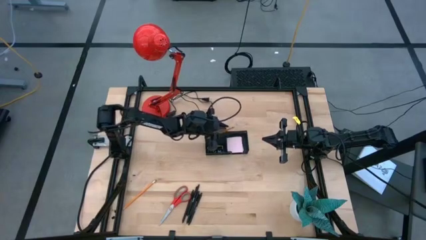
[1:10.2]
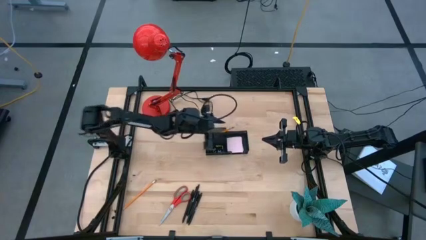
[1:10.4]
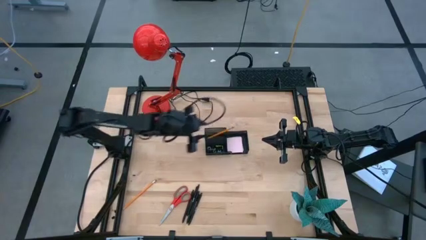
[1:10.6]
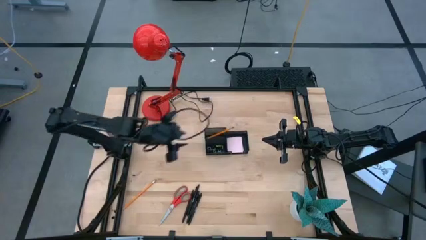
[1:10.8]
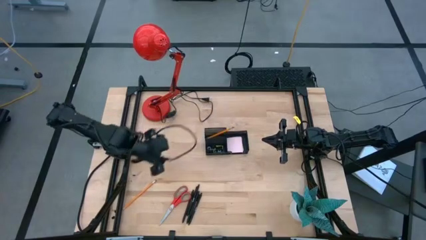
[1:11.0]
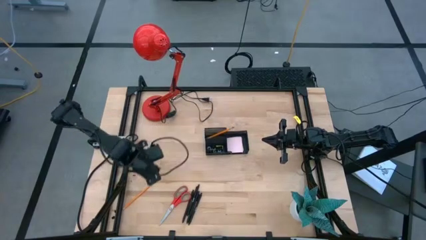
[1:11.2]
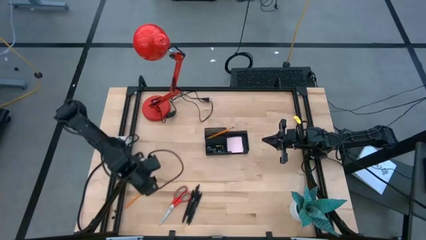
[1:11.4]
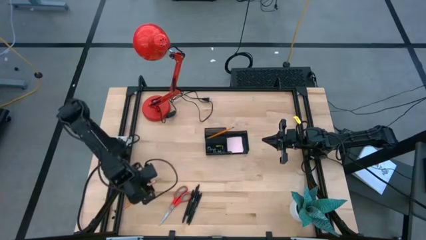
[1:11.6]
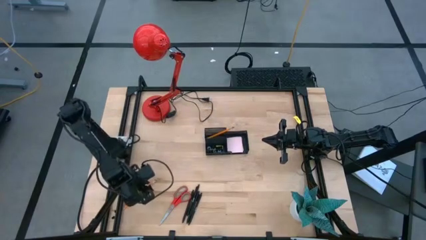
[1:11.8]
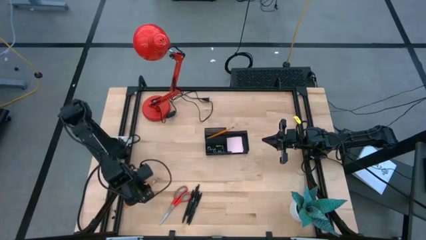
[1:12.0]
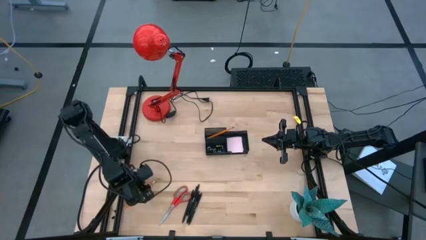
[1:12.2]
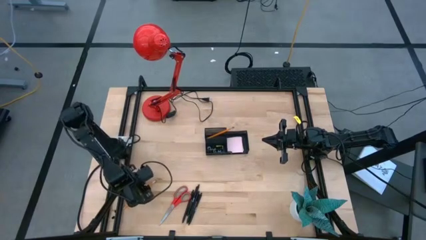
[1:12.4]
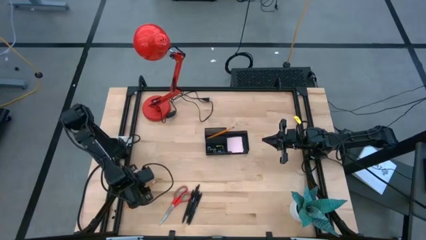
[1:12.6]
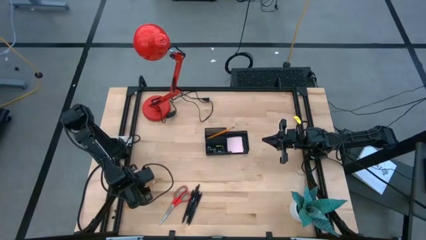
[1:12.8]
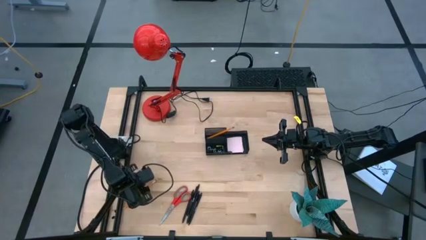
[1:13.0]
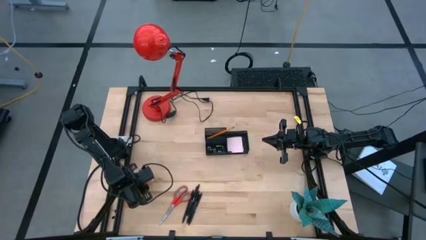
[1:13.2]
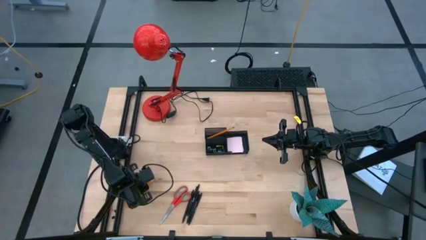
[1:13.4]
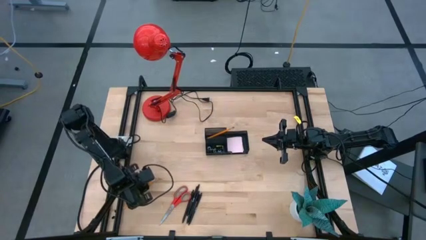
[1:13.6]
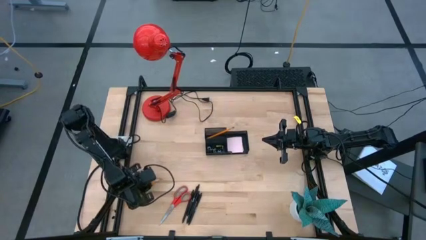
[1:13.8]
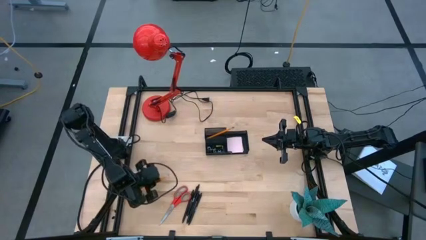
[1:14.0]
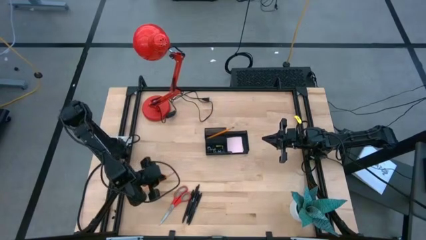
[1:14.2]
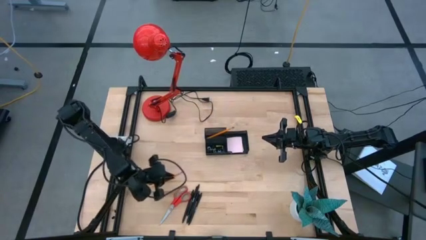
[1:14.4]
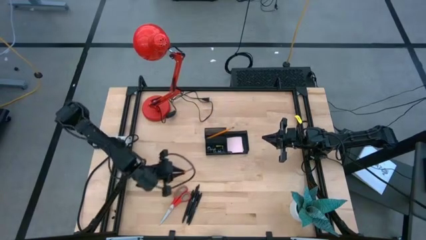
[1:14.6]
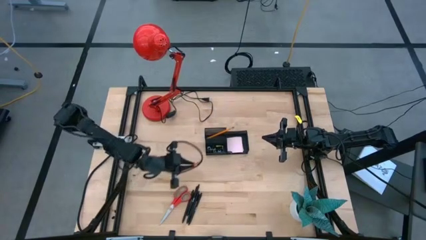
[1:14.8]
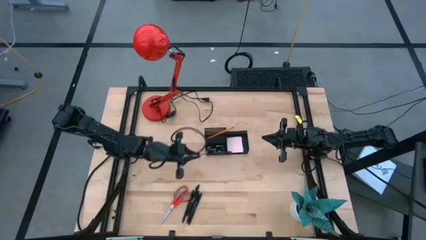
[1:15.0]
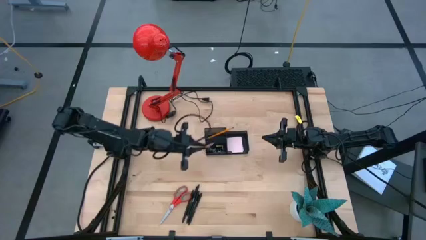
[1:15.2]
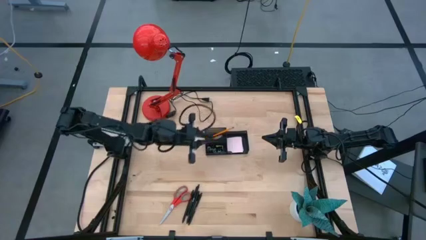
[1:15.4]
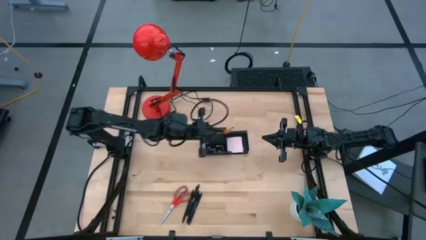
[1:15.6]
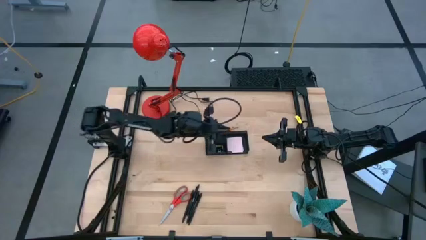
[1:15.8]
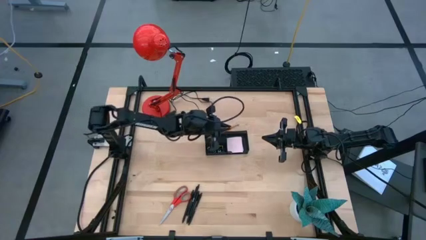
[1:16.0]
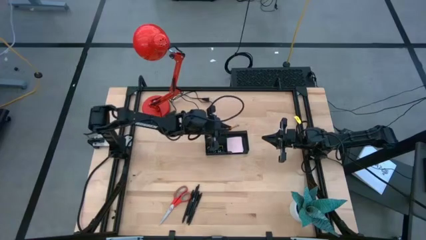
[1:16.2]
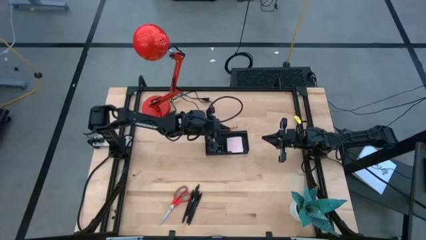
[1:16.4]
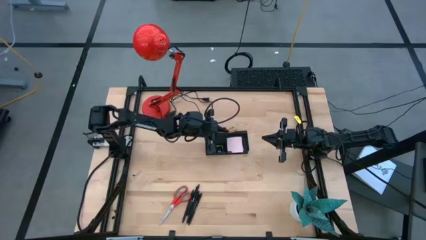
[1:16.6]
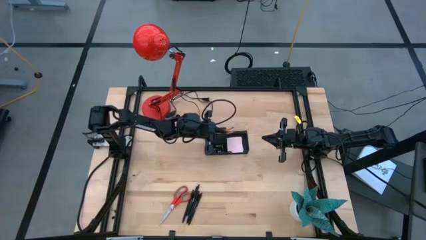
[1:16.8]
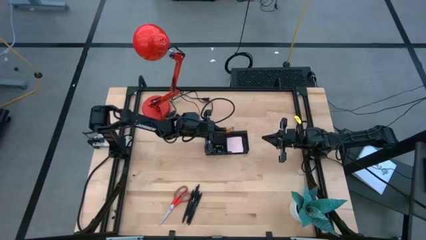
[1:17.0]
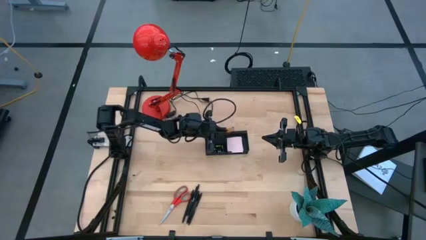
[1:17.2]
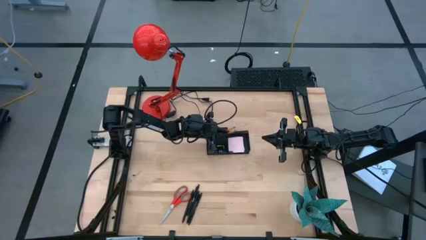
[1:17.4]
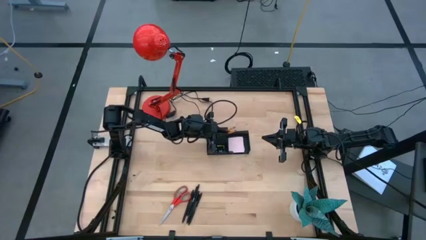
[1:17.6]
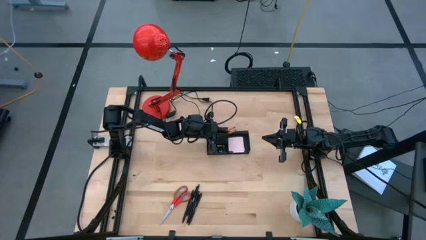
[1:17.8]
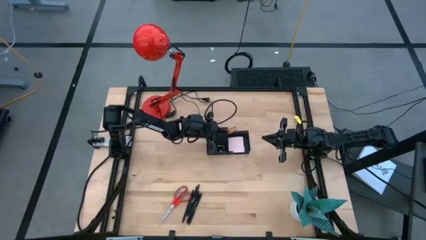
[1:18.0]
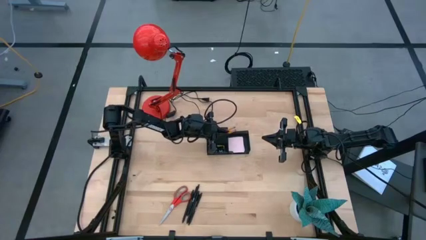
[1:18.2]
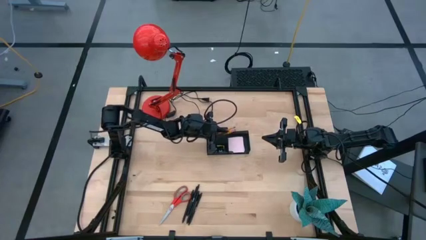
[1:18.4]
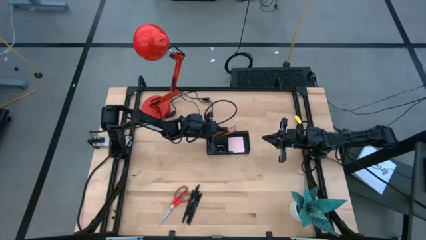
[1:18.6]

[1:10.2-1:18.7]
Task: Pick and place office supplies into organizer
Put the orange pencil into the black desk organizer

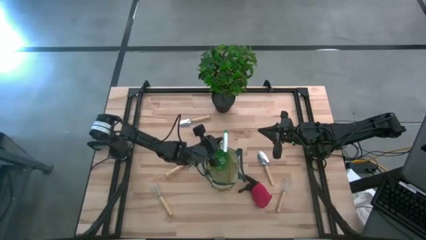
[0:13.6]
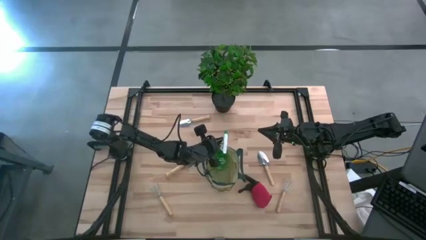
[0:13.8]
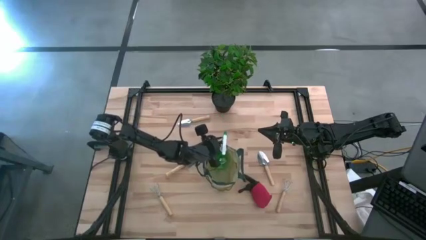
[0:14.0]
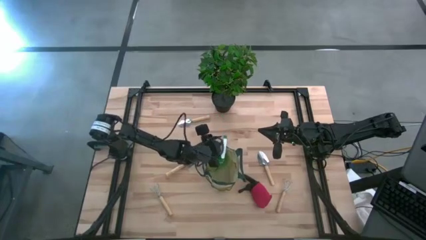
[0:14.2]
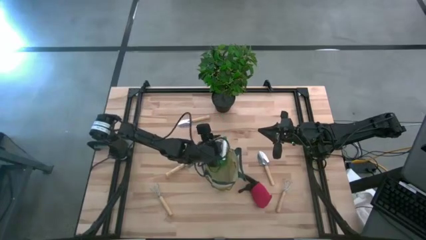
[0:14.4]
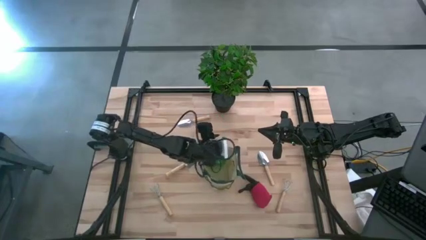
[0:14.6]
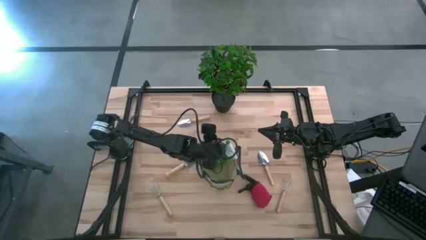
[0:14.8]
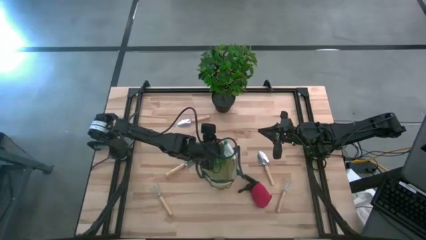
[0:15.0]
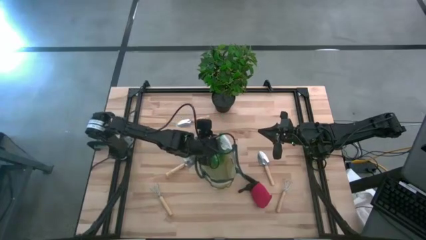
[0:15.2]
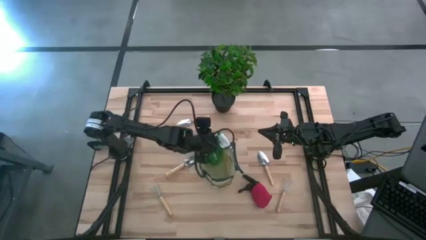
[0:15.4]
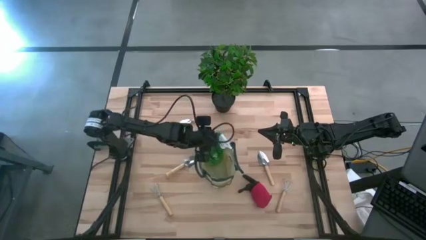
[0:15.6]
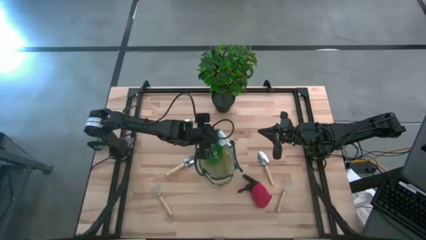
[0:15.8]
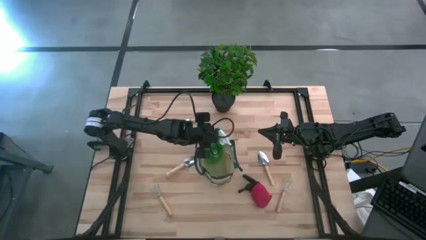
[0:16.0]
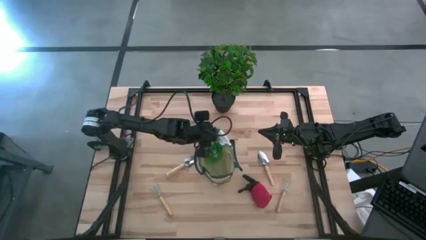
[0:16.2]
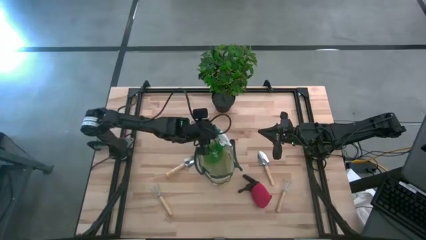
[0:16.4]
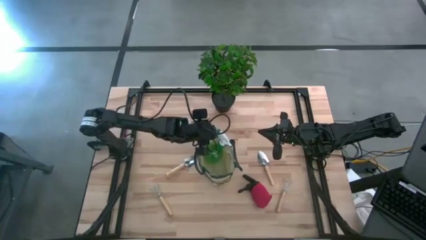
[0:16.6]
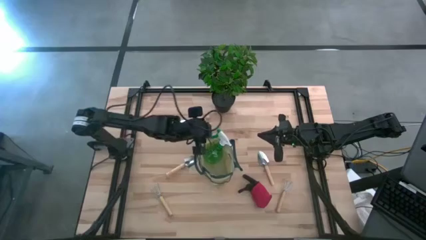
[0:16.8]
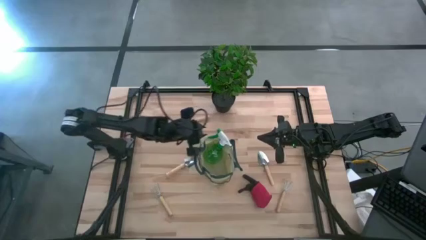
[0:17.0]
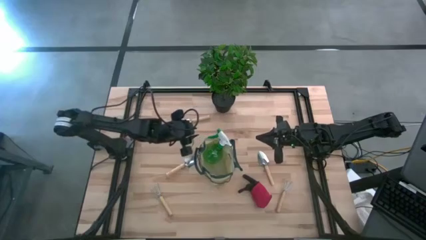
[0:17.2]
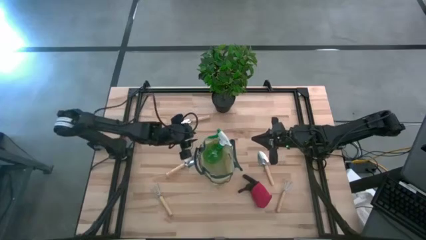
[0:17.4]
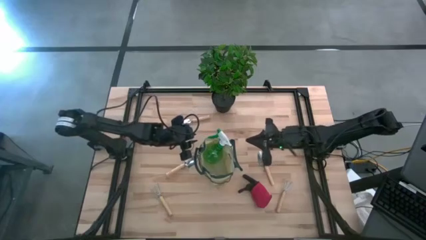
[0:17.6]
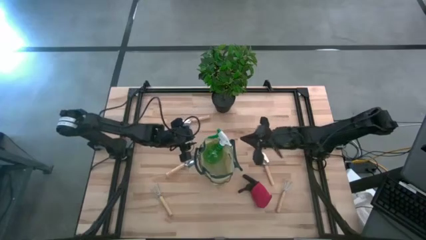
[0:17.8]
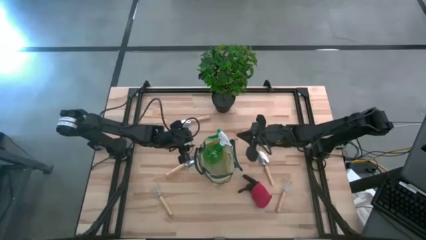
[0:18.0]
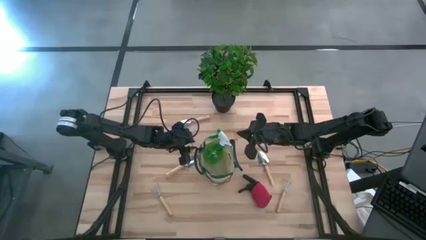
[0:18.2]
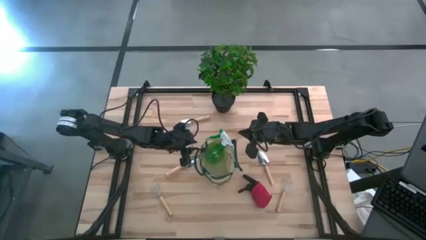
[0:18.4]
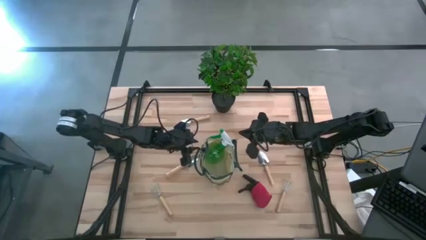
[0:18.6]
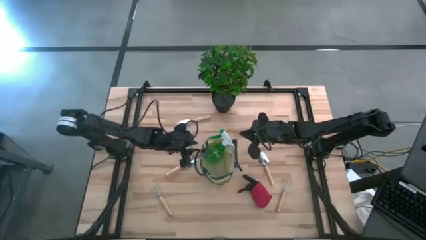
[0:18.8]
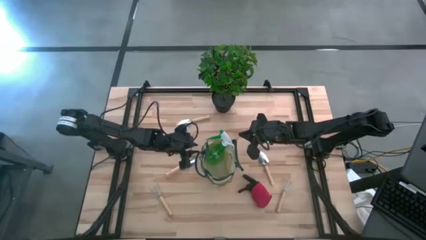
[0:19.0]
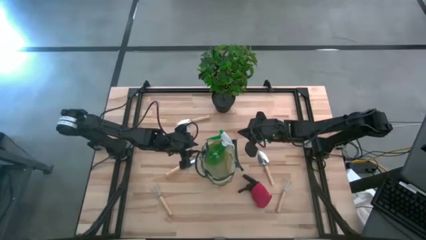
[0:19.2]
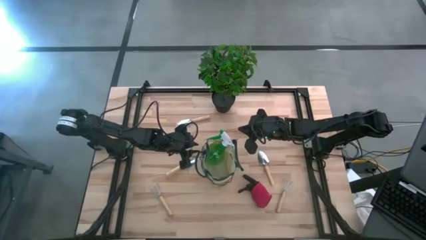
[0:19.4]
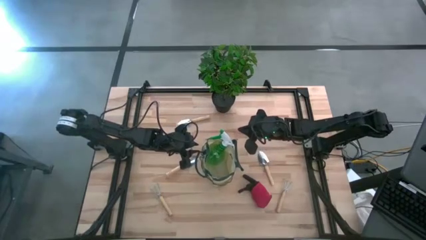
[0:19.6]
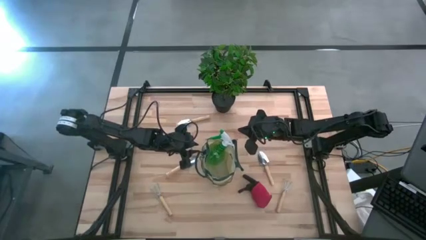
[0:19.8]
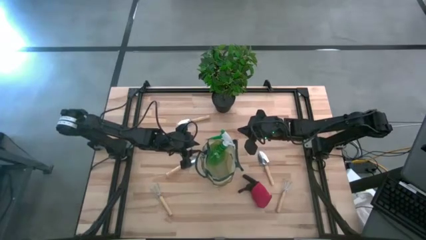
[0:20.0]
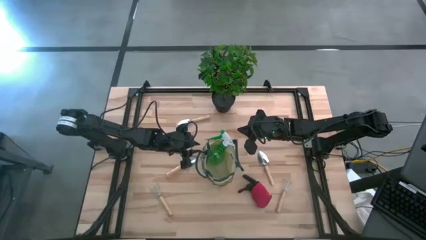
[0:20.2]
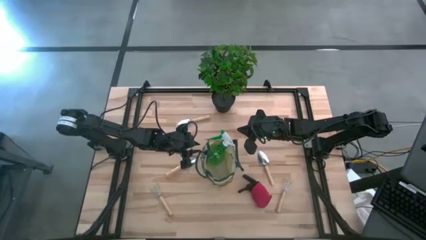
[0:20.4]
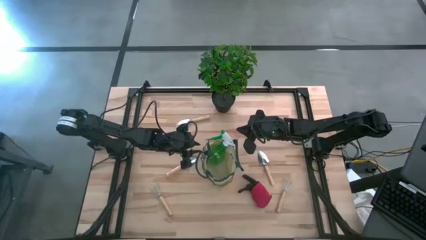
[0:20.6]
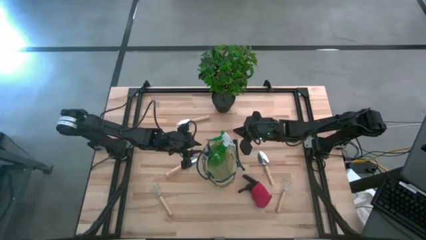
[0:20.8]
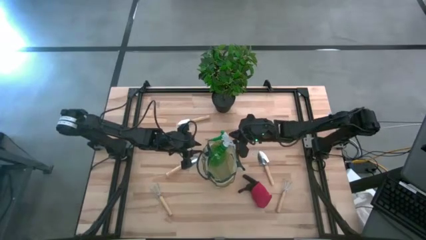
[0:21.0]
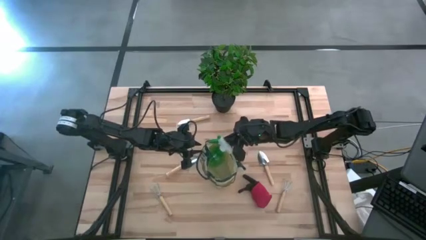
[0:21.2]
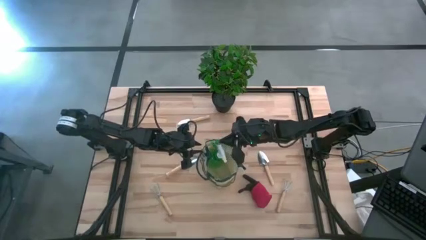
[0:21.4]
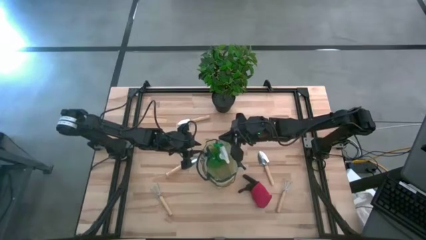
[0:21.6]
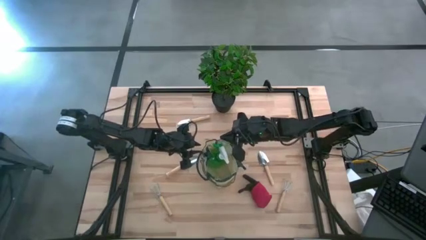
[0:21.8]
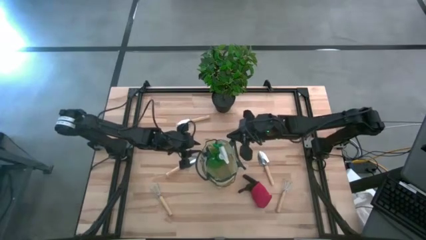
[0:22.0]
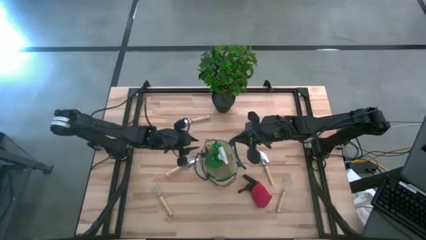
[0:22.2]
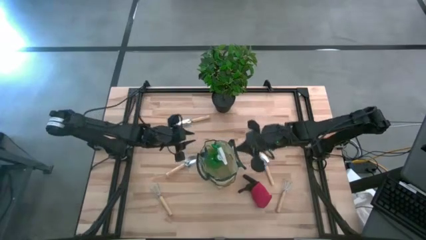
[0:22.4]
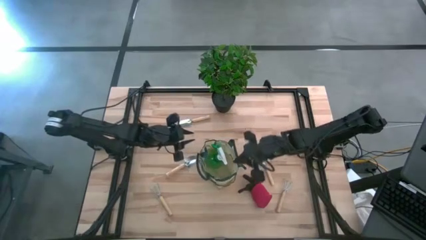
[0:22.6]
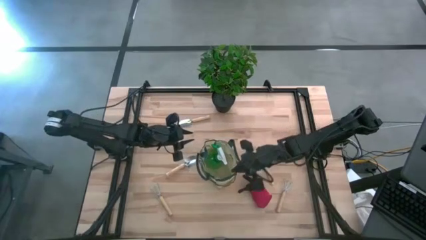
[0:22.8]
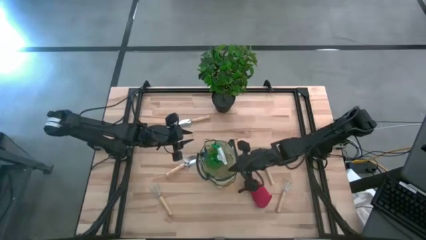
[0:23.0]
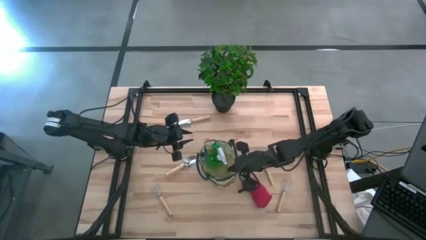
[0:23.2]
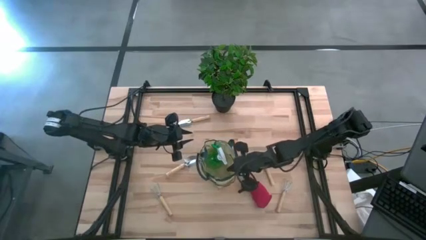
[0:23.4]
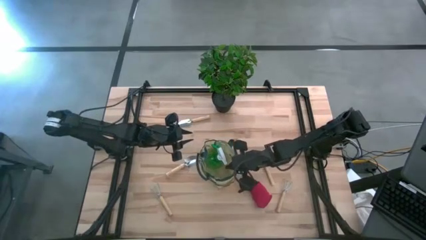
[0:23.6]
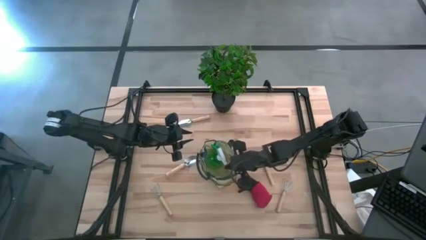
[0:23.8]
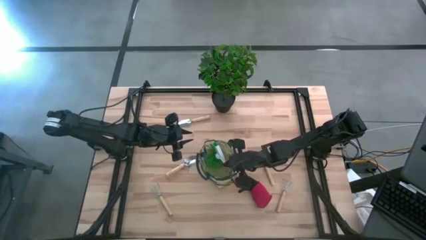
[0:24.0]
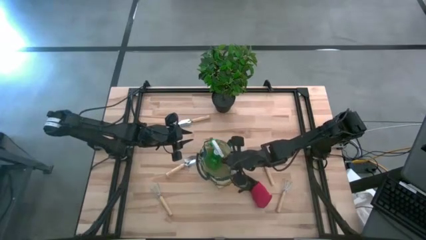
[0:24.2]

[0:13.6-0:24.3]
Task: Pick & Place Garden tools in Gardening bag
Put the green spray bottle into the green gardening bag
